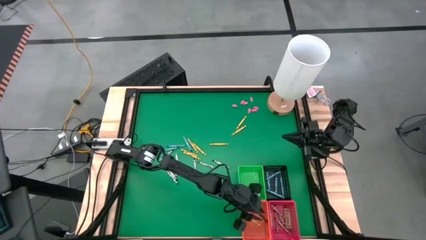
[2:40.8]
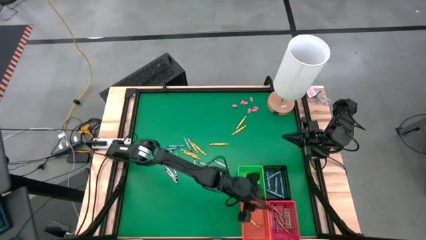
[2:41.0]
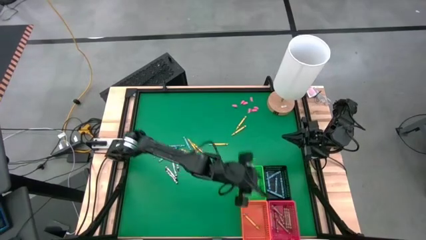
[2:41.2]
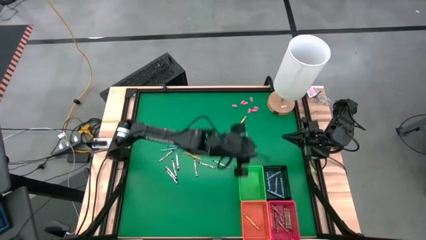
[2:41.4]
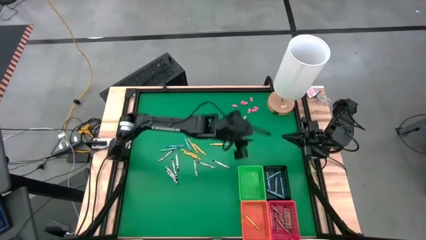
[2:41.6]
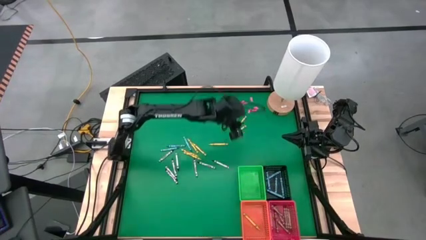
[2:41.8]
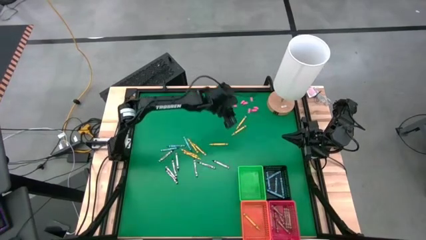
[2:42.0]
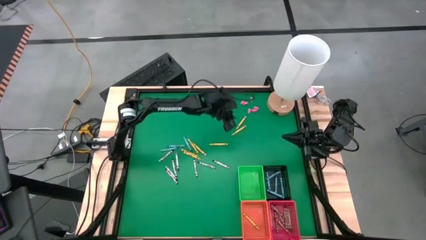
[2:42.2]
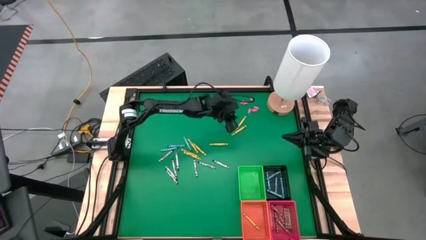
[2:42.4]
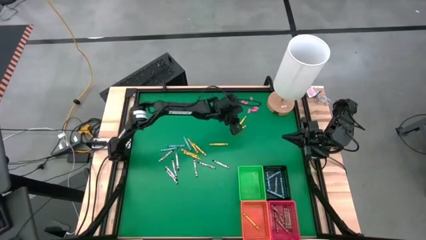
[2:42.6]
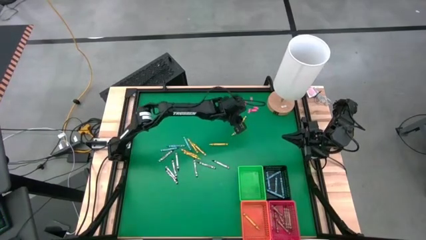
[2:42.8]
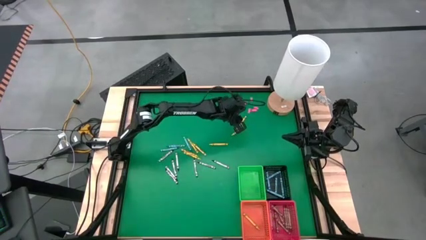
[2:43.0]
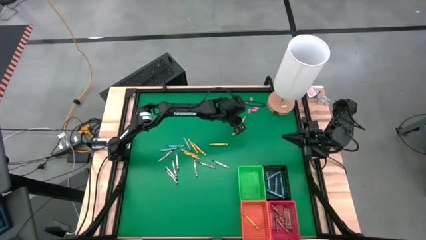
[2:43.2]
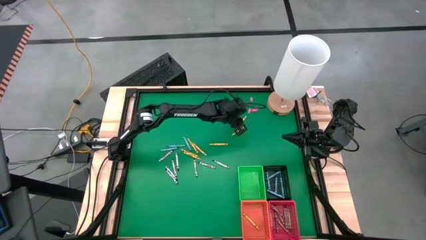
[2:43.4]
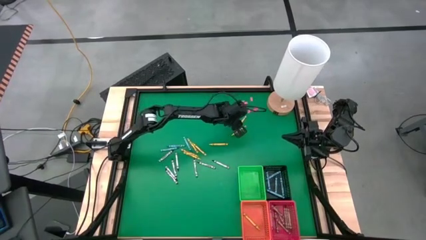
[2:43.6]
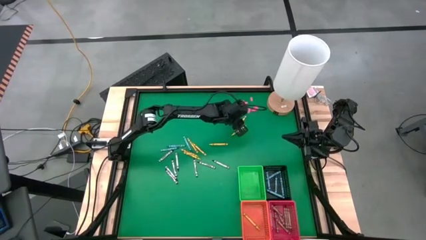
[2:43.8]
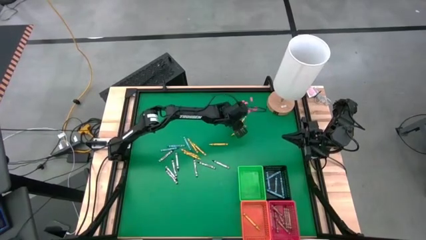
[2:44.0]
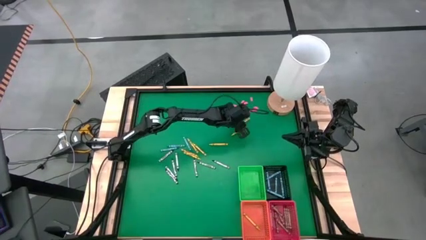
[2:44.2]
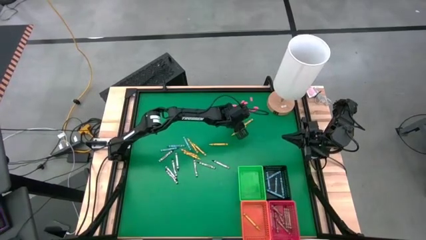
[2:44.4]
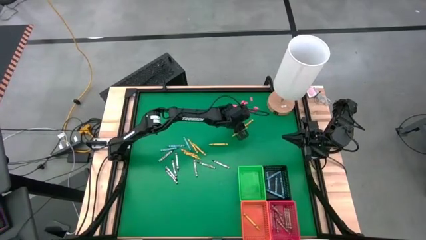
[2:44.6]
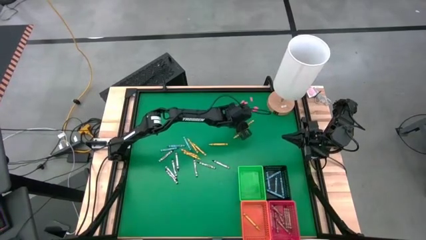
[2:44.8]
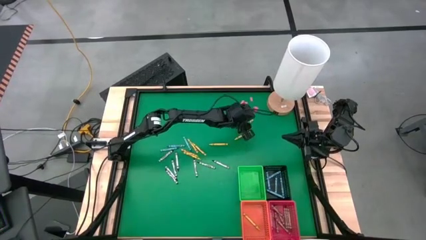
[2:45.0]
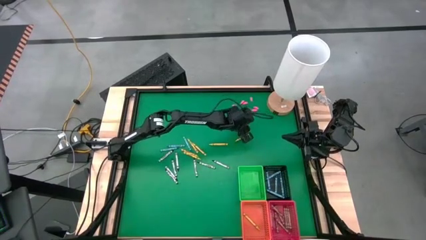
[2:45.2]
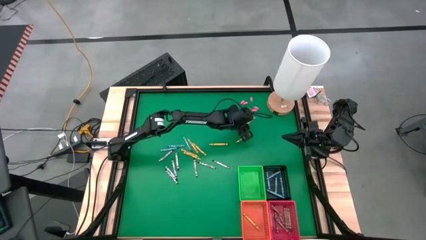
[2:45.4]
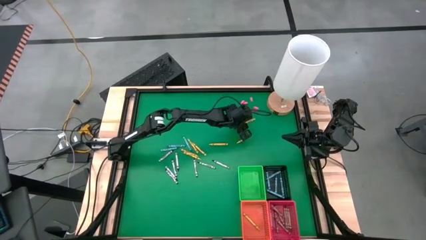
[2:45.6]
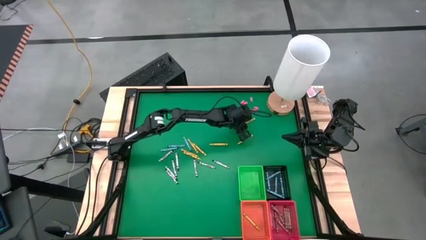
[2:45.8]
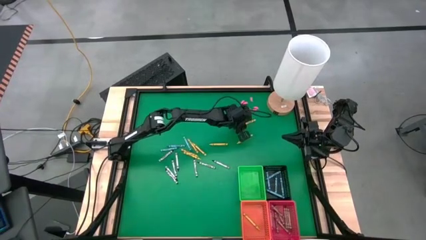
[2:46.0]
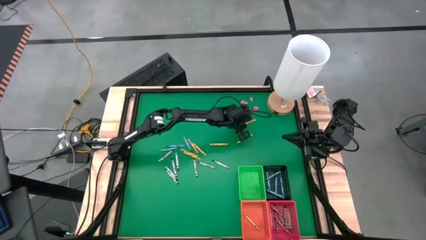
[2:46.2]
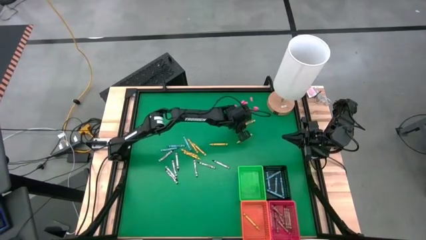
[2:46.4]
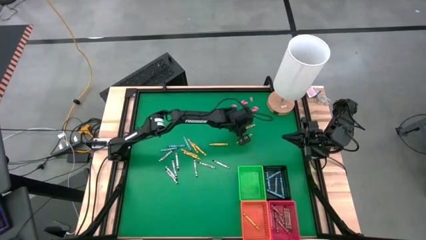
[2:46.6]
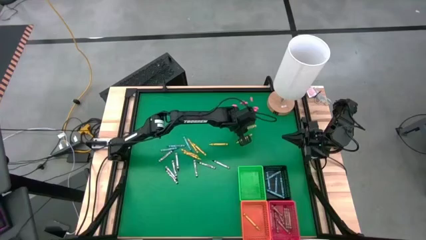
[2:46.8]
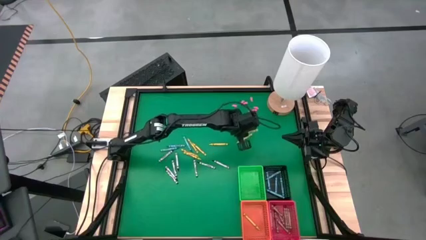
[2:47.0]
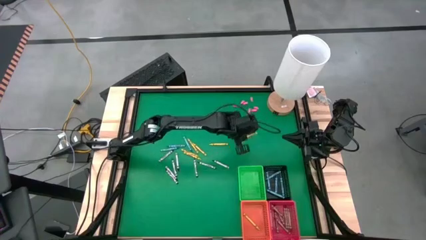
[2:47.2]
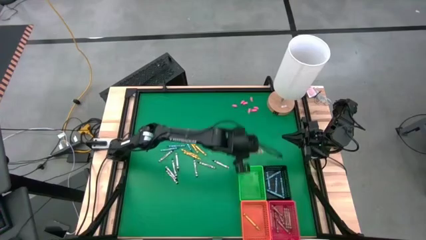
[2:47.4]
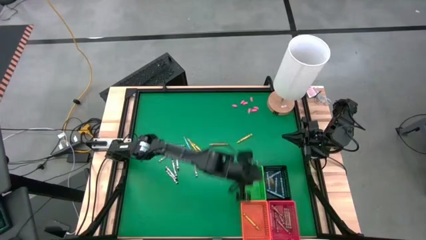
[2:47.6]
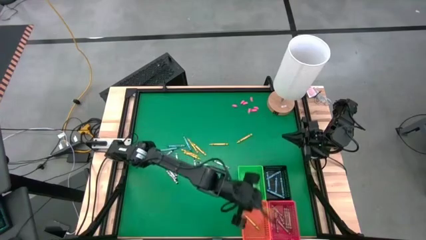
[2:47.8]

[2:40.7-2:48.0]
Task: Sort crayons
Put the light green crayon into the orange bin

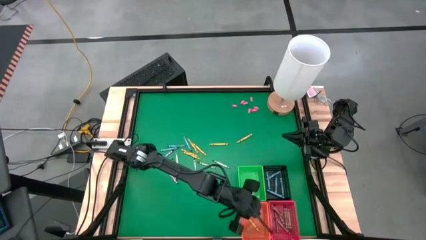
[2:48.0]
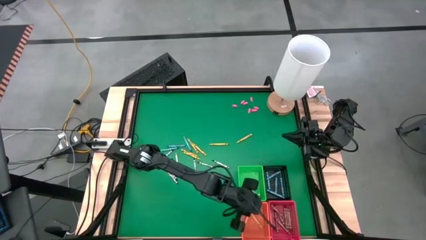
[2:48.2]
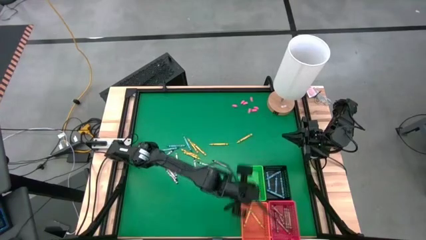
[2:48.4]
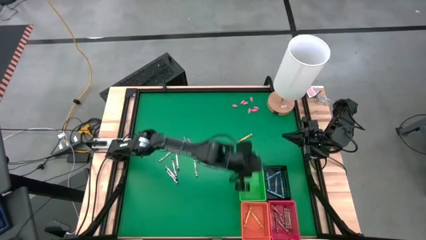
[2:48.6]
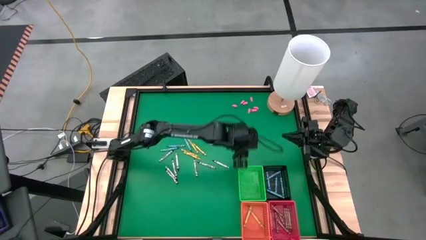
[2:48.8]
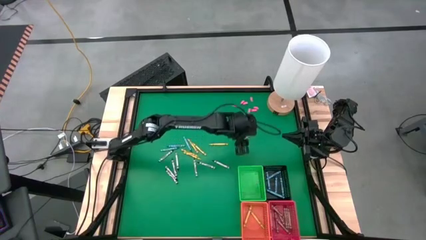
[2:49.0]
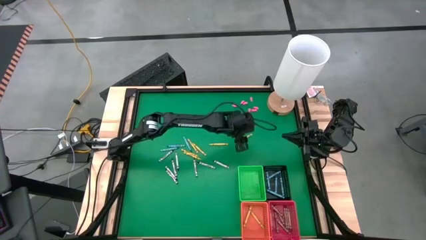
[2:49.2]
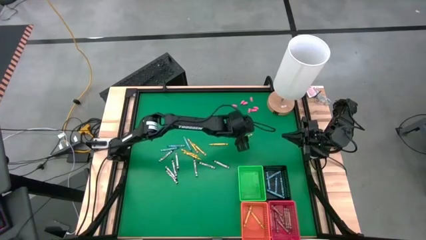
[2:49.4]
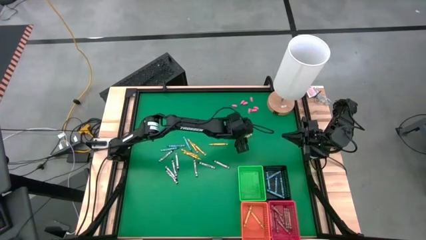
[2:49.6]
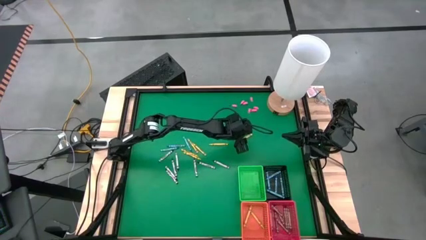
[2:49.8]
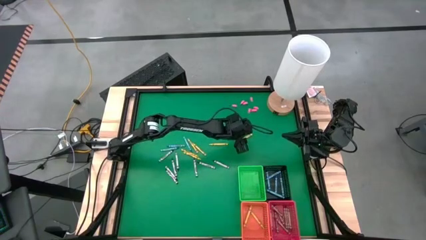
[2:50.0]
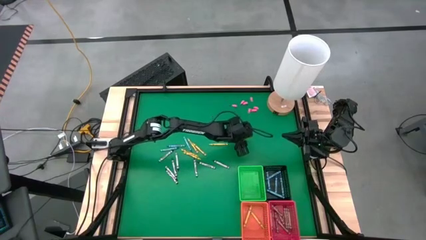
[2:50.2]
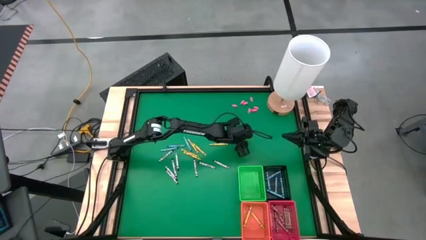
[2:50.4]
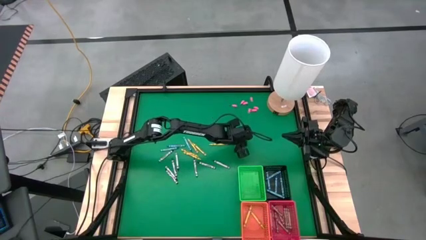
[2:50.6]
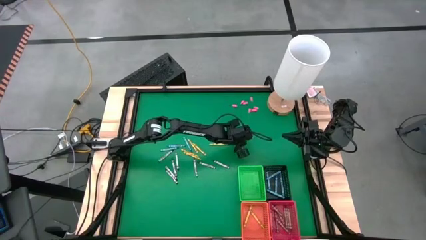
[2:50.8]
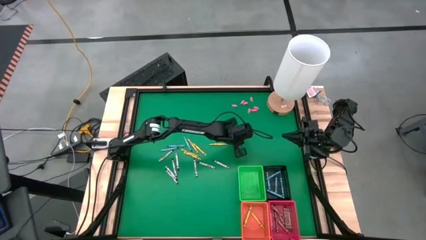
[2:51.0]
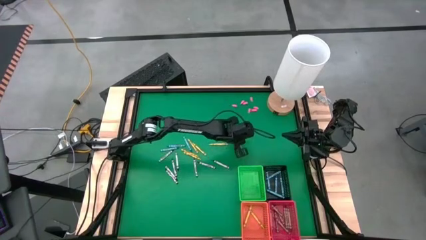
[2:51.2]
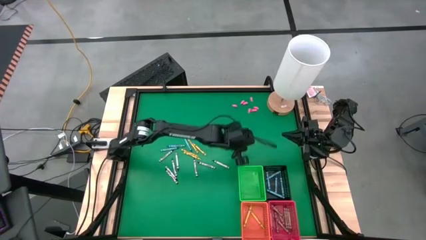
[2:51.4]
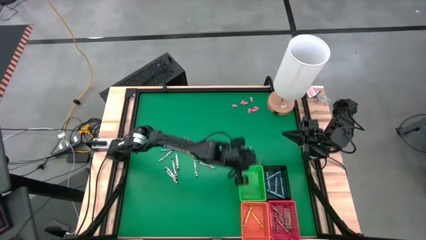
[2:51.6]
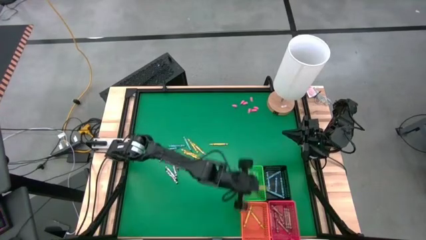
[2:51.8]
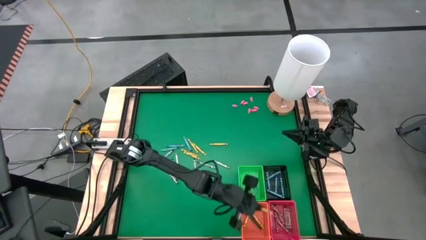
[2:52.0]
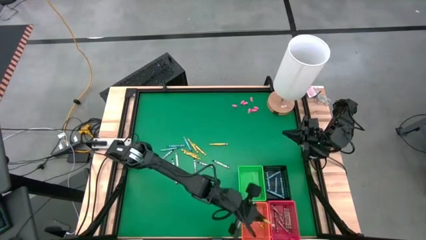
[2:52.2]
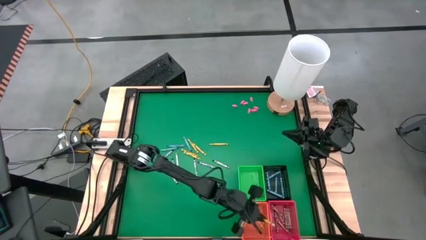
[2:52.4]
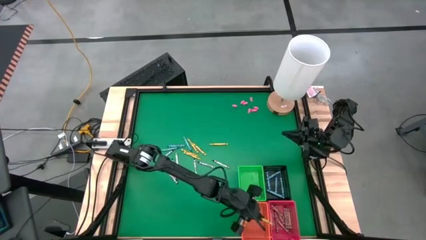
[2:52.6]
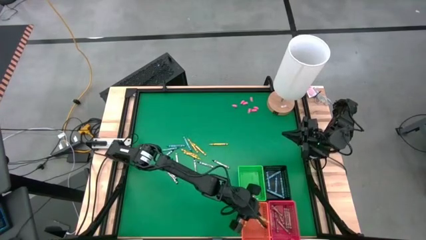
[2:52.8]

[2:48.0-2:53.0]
Put the light green crayon into the orange bin

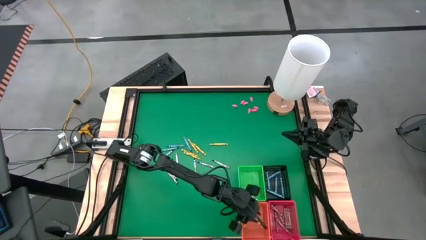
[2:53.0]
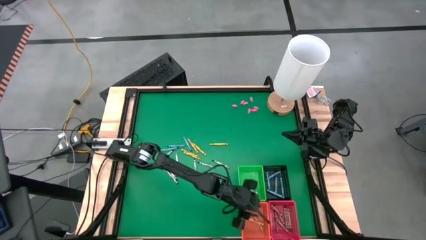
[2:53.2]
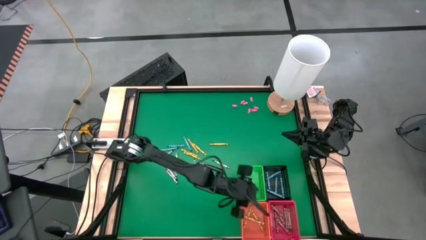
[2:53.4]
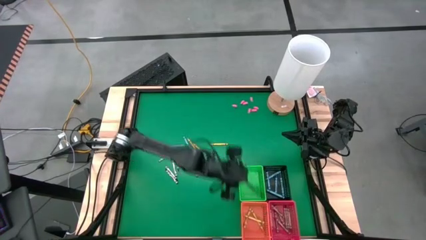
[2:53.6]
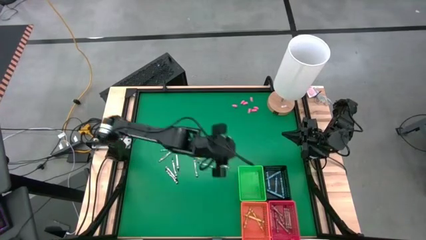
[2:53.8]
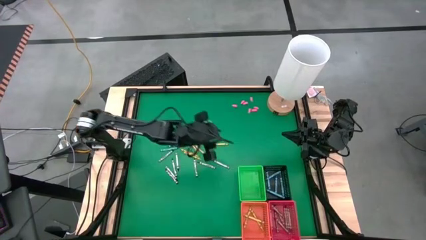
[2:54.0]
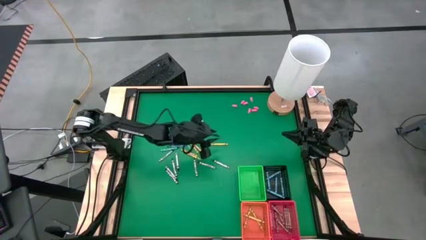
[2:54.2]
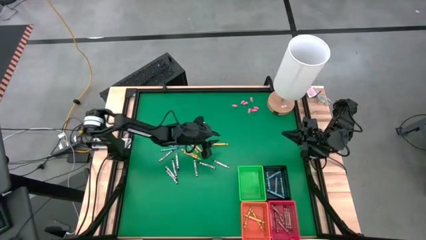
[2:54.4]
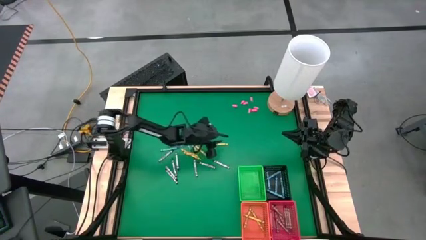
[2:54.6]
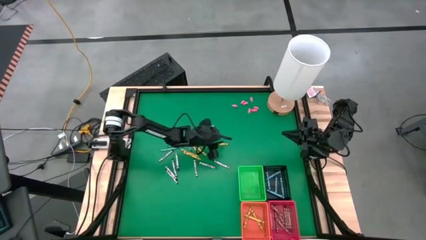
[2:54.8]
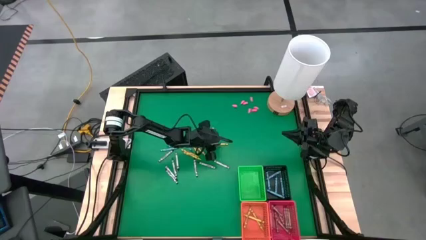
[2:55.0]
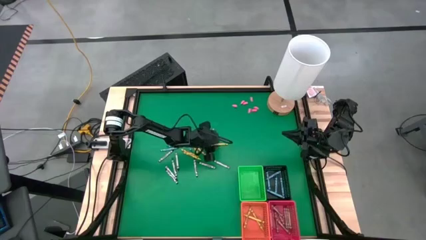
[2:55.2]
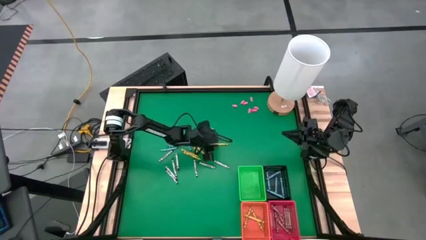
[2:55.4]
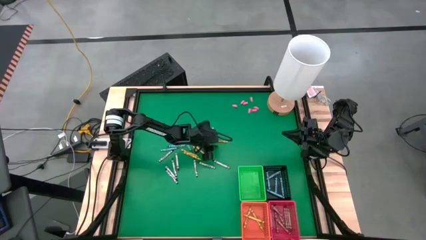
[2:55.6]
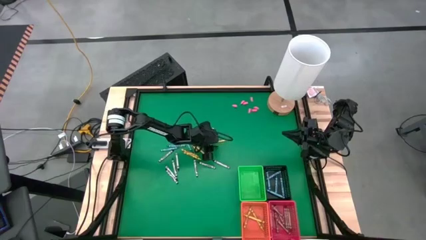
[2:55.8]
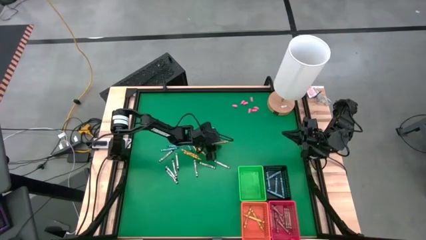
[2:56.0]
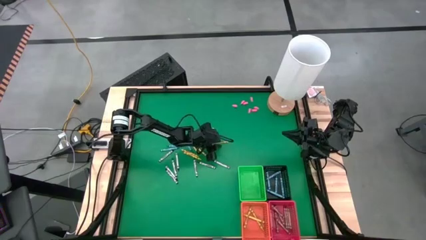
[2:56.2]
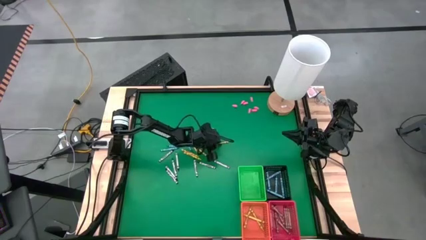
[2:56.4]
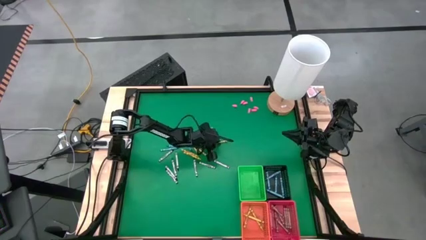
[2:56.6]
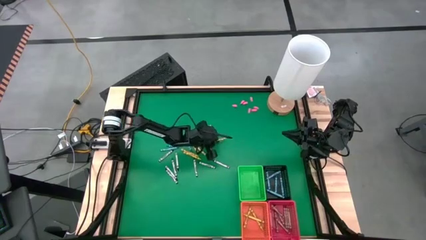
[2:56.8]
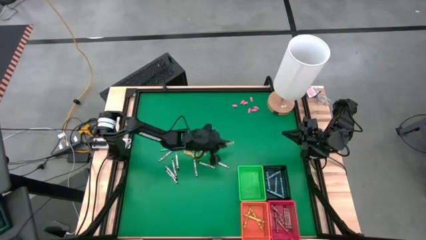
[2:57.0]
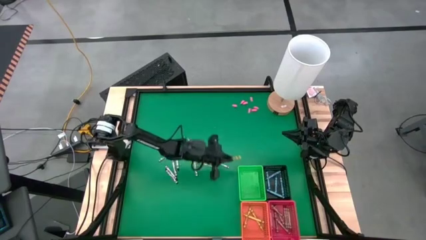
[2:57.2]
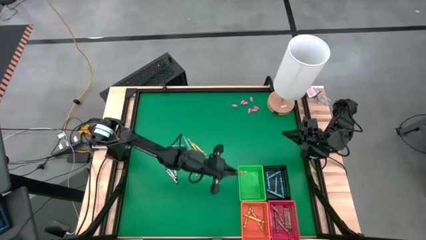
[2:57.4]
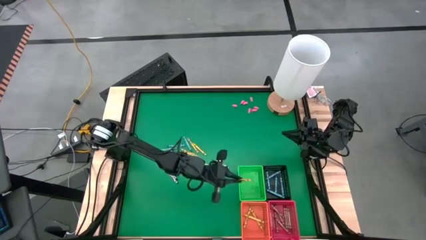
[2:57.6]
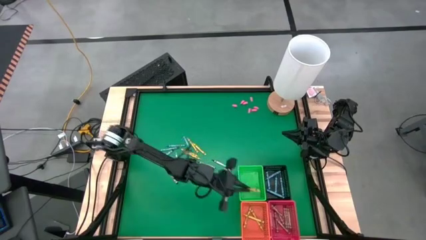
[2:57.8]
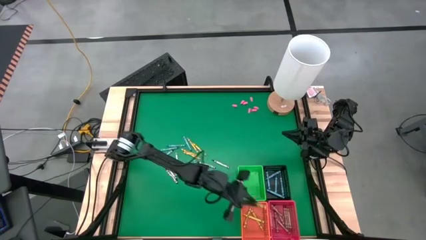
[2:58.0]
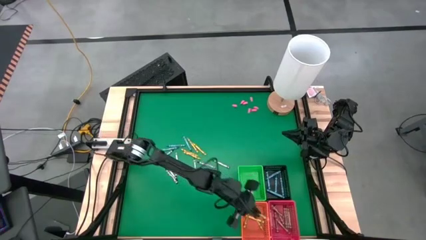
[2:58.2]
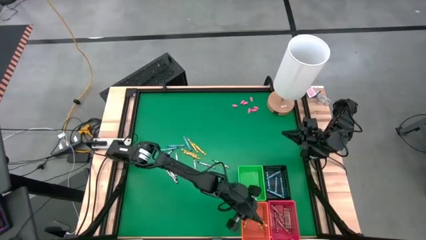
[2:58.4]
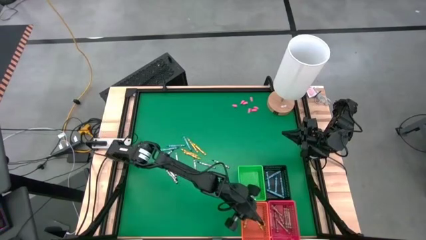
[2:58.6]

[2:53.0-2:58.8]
Put the light green crayon into the orange bin
